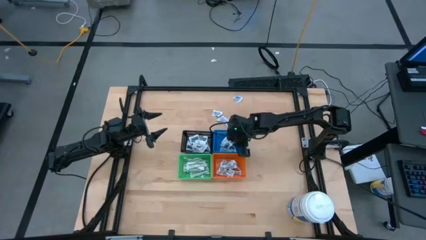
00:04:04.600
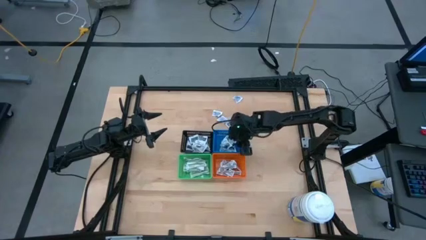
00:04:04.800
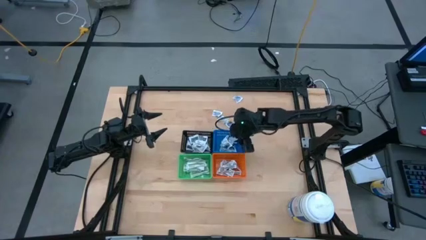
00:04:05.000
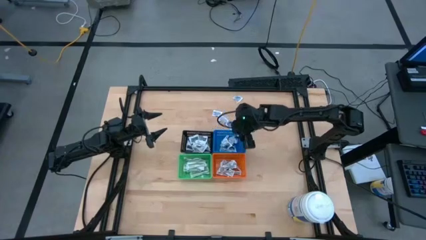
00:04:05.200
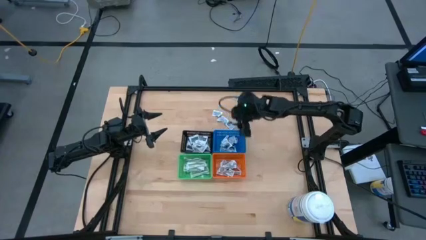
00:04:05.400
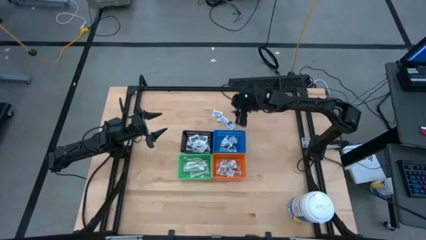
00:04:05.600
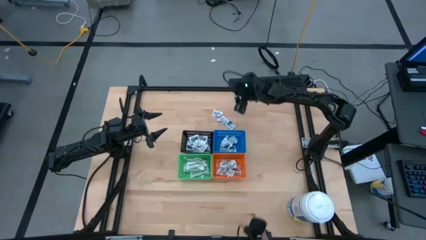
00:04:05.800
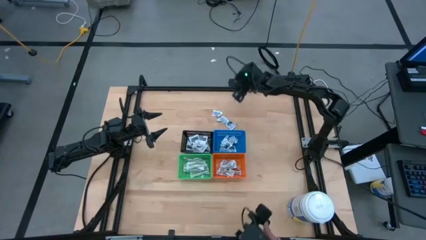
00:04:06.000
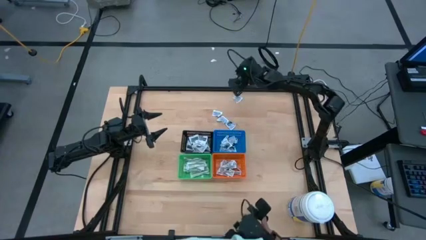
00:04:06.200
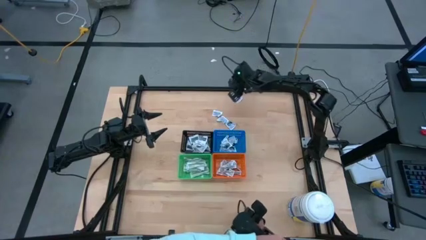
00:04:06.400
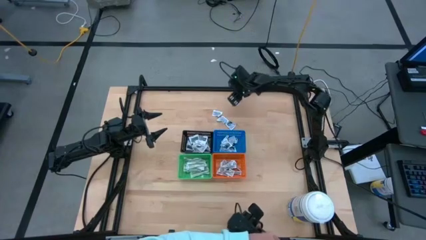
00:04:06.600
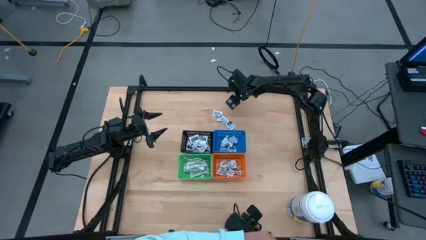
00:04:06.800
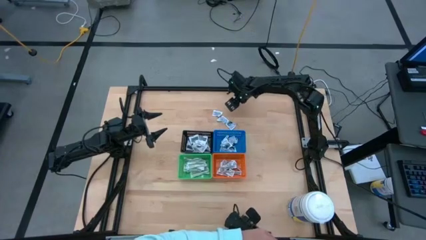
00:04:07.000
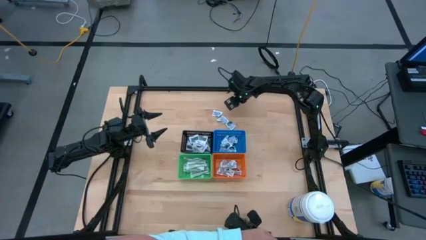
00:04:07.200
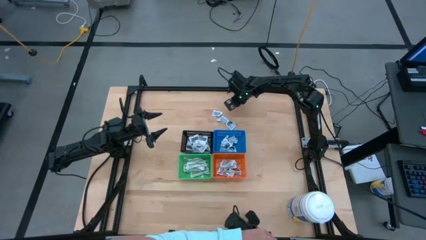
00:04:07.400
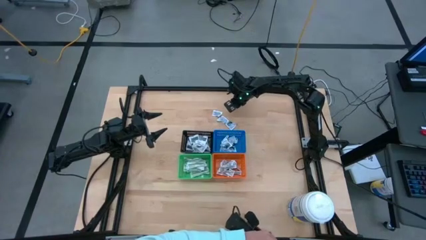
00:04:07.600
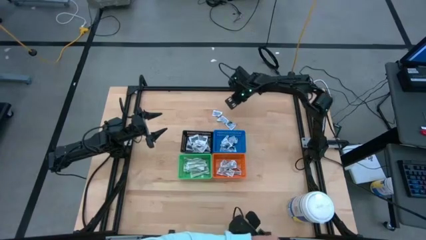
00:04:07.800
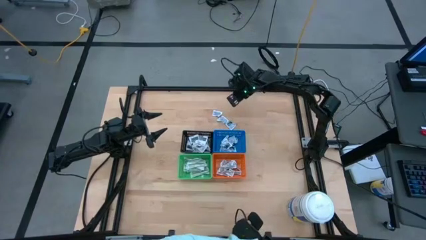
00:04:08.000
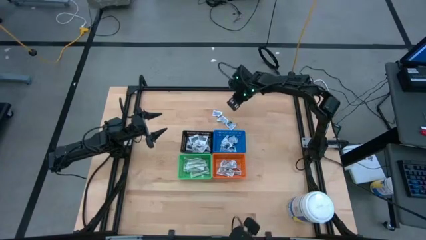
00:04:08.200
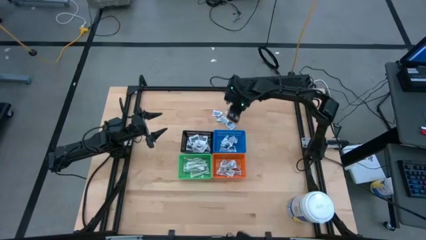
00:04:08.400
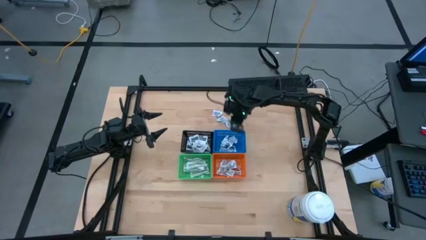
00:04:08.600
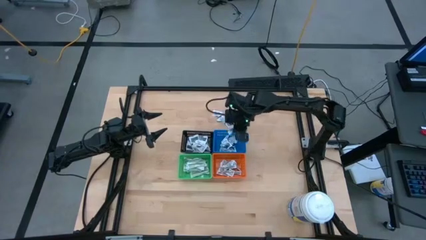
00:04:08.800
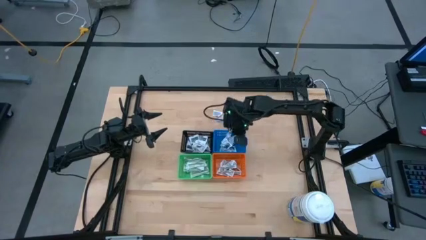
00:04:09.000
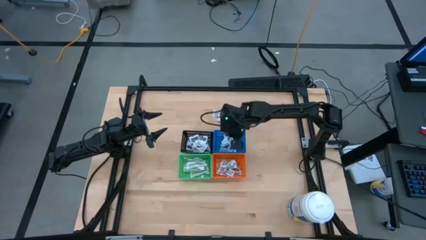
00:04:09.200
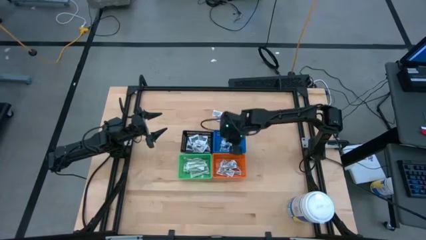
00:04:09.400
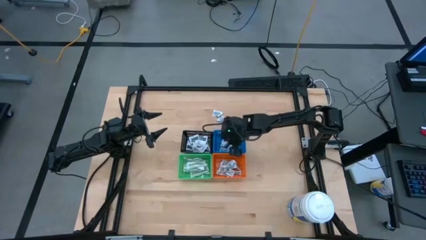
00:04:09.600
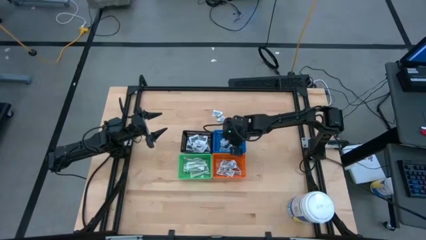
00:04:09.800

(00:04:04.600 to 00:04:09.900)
Task: Pick & Place First Aid Supplies
Put the alcohol pad into the blue bin

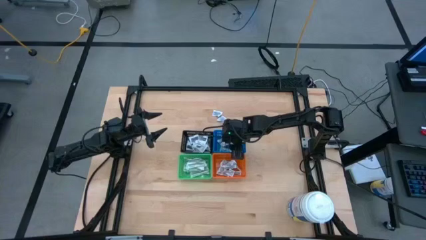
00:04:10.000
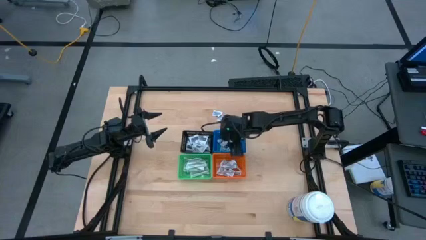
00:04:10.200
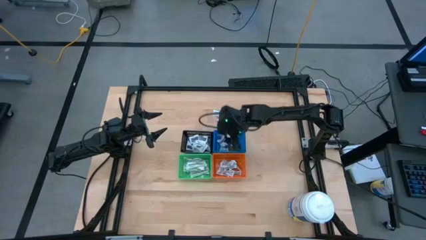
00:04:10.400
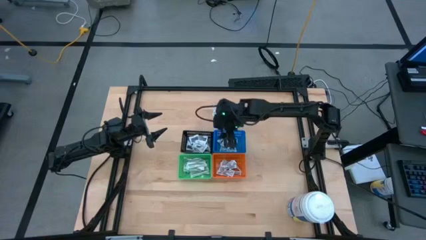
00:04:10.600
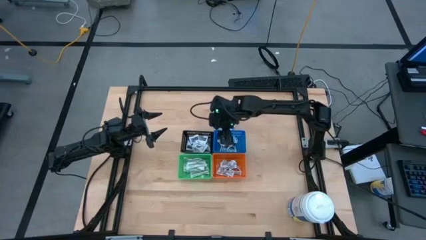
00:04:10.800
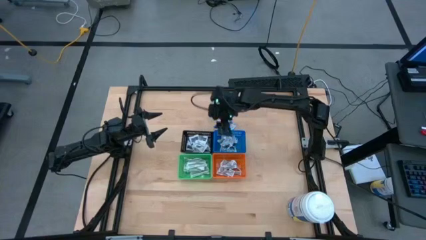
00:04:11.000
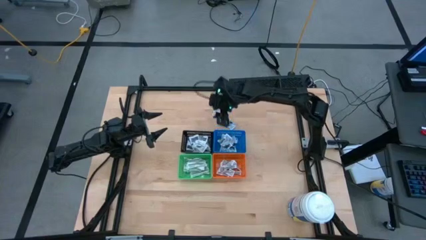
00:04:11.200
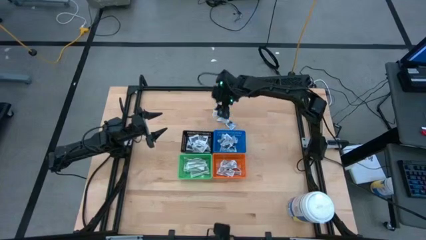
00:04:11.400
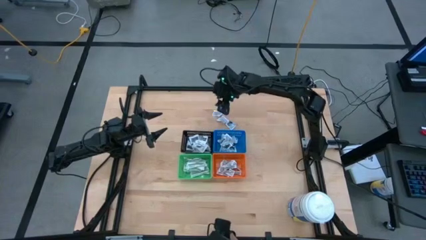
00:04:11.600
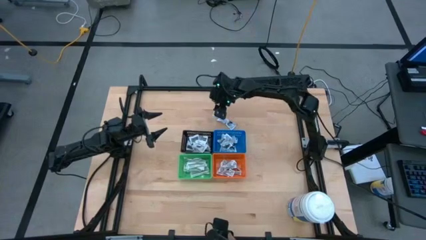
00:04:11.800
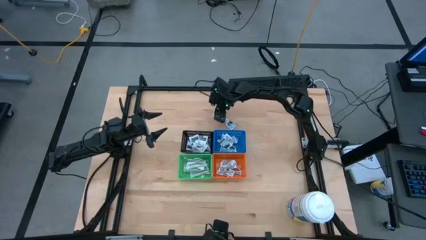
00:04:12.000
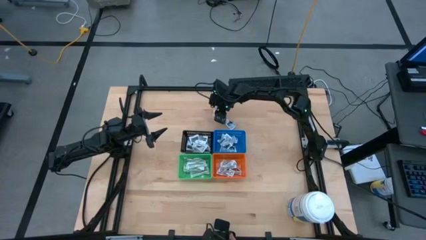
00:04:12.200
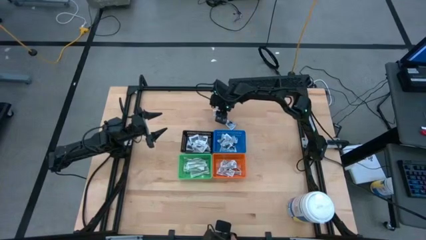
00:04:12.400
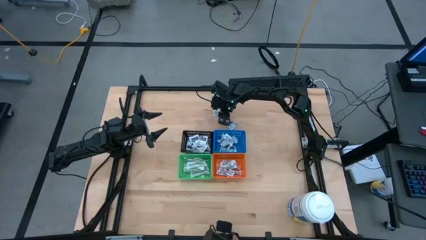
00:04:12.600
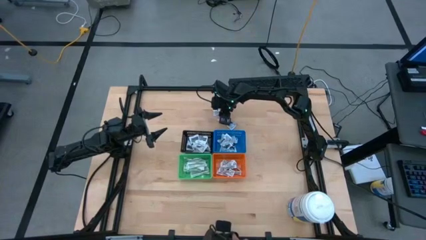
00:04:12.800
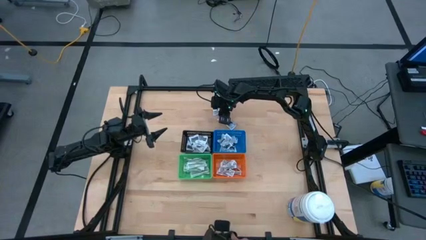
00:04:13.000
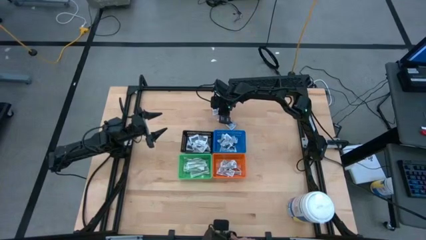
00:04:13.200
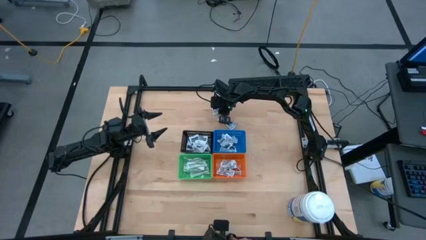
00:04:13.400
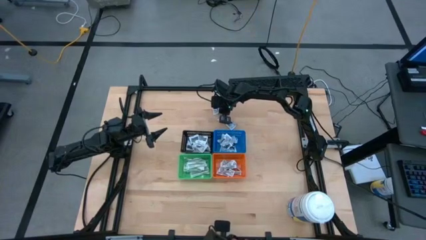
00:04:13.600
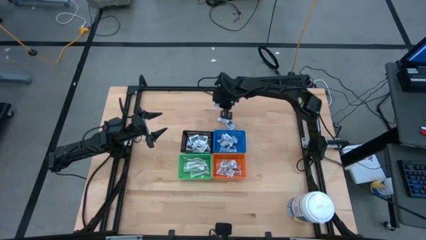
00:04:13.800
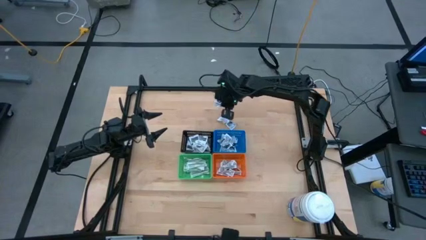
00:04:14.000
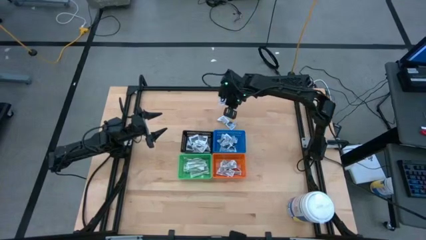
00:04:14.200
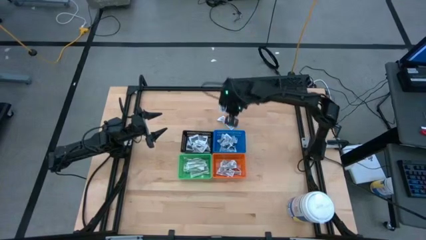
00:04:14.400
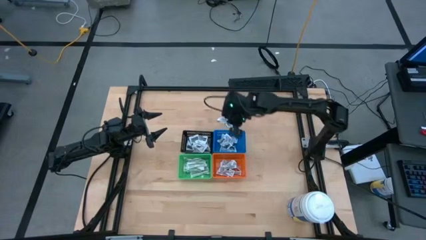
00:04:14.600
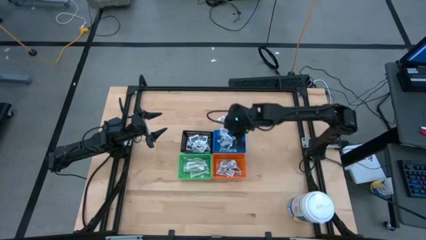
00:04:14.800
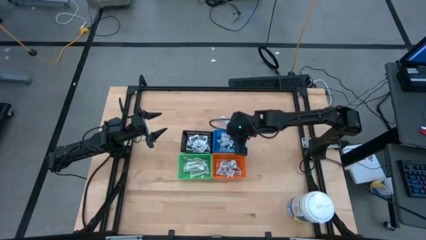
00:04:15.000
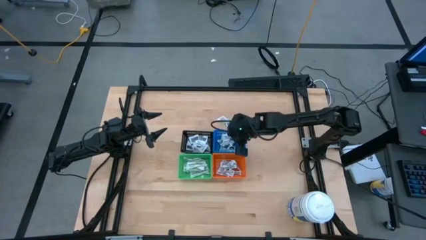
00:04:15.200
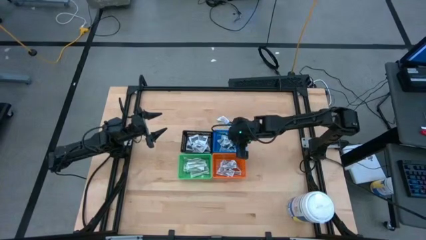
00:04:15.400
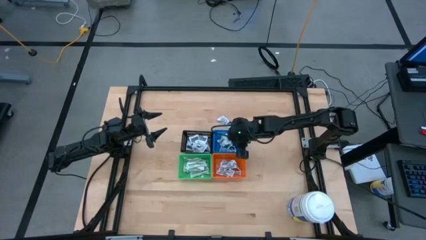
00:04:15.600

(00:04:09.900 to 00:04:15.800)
Put the alcohol pad into the blue bin

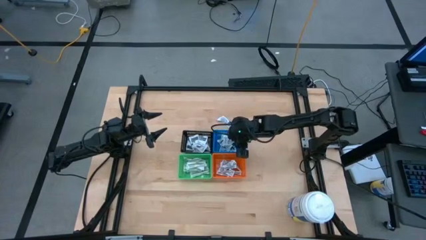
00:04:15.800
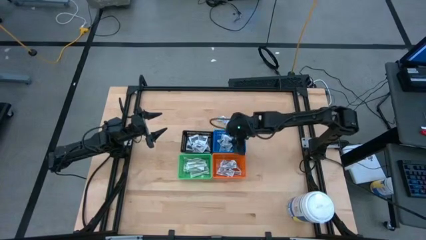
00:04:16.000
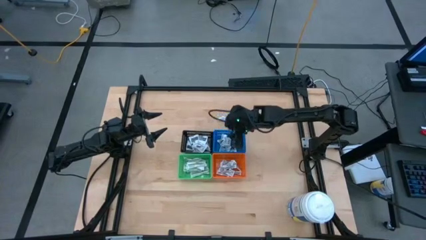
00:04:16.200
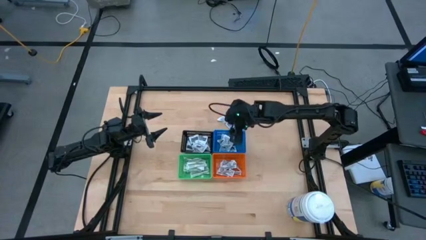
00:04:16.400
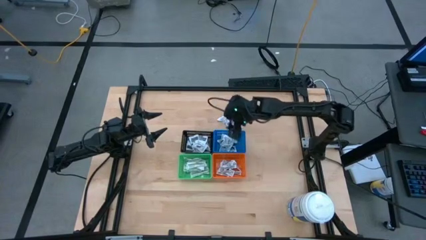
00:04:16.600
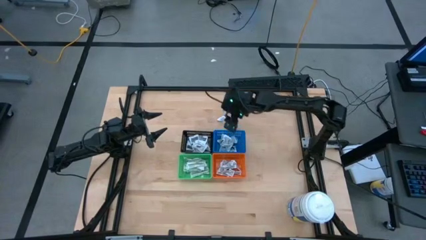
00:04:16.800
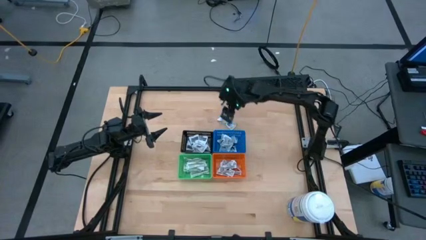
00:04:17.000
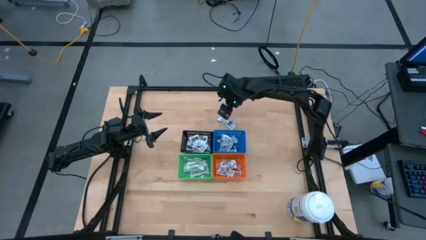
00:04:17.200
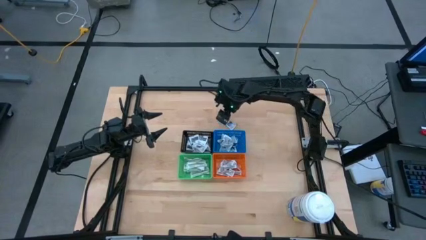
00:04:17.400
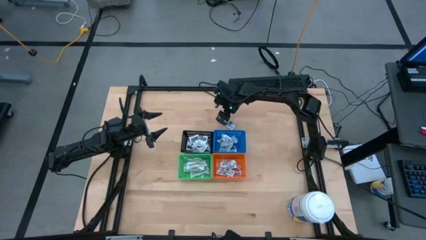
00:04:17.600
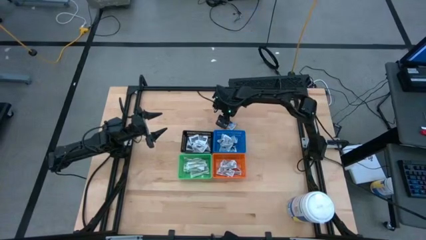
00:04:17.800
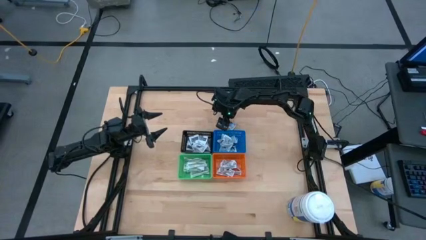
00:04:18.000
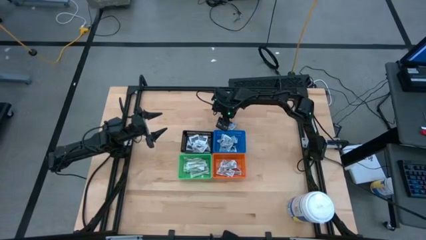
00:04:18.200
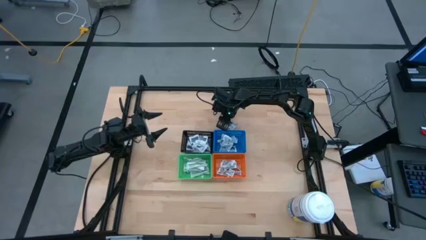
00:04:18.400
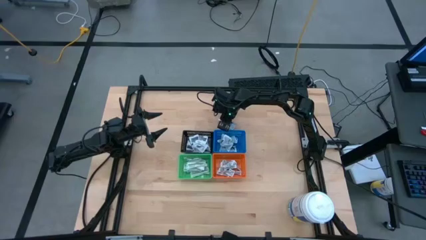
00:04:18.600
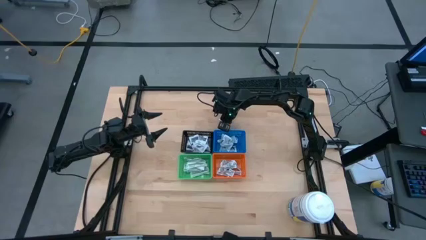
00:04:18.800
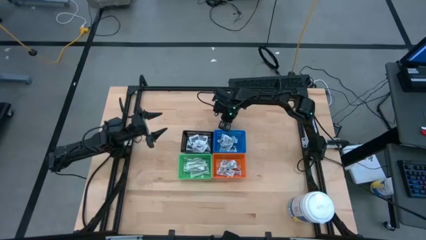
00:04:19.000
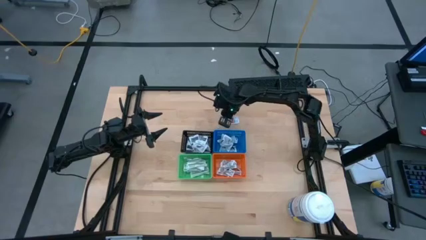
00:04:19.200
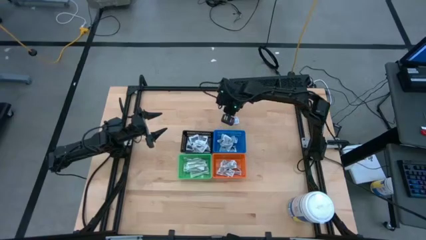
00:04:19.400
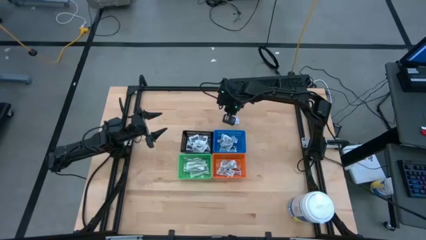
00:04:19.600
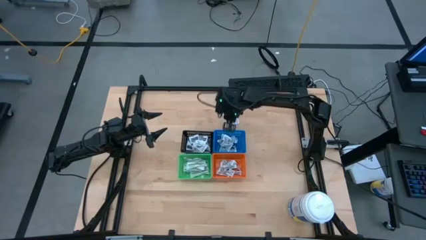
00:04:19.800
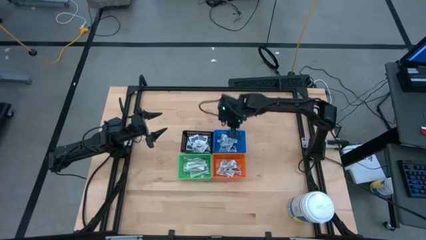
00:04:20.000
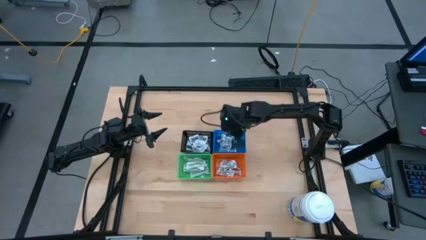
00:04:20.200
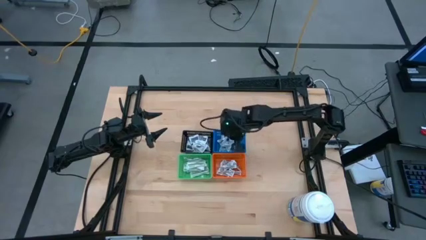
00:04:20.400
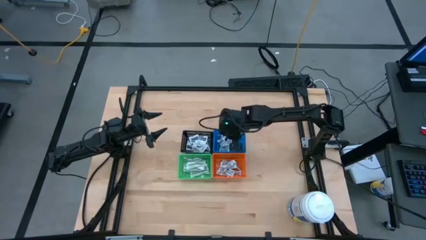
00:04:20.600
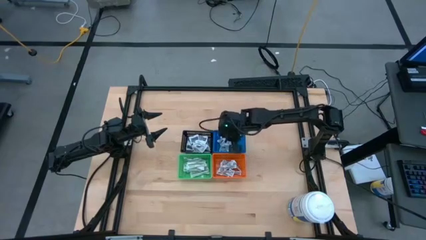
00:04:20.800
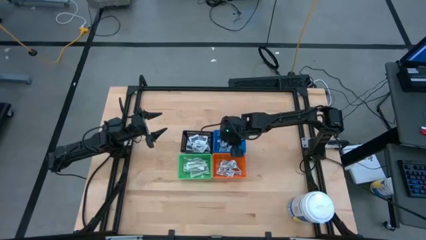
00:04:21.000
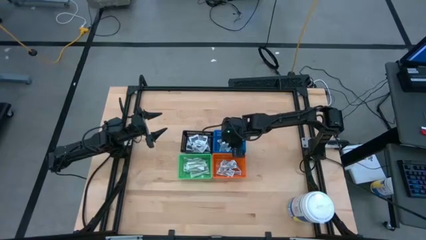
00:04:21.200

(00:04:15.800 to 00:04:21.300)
Put the alcohol pad into the blue bin
